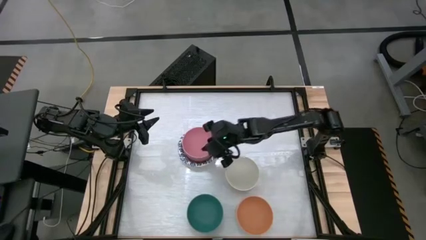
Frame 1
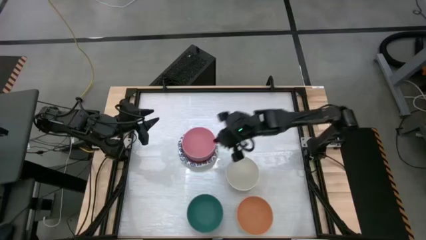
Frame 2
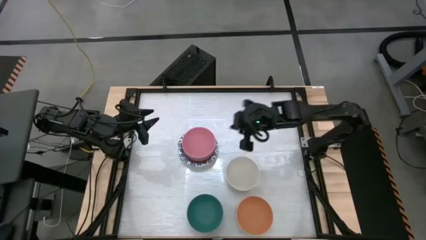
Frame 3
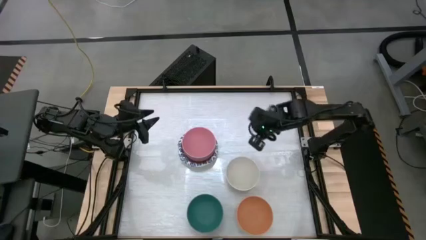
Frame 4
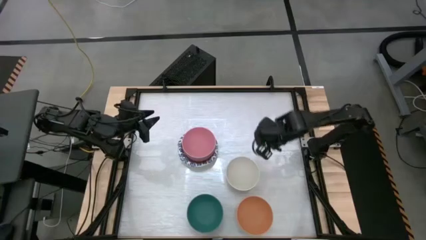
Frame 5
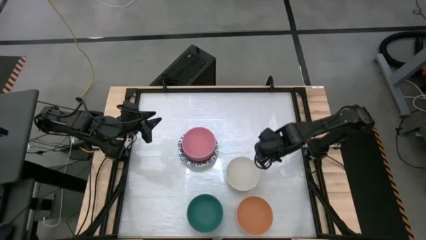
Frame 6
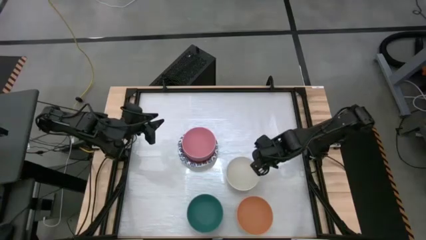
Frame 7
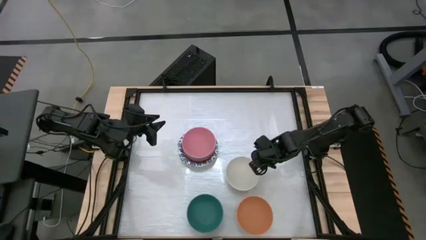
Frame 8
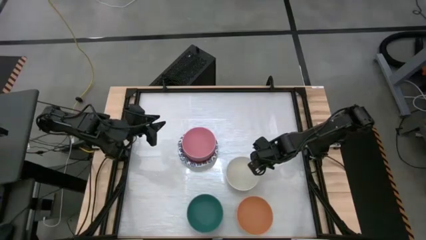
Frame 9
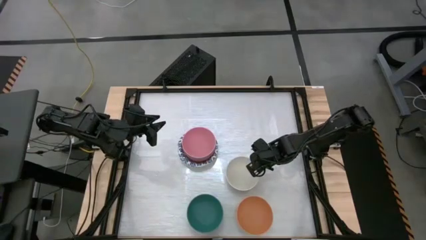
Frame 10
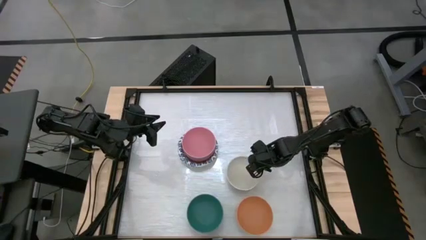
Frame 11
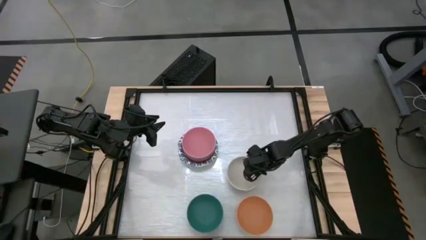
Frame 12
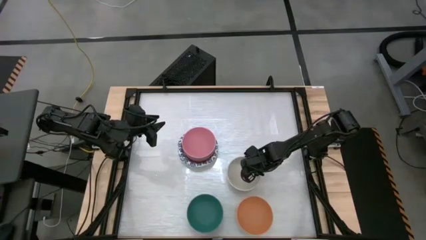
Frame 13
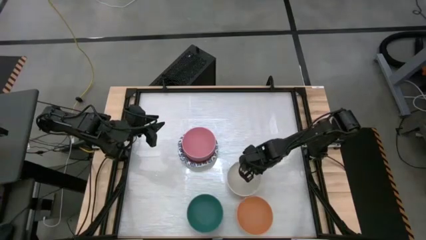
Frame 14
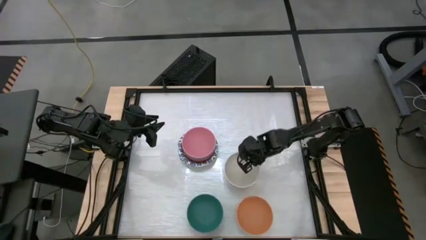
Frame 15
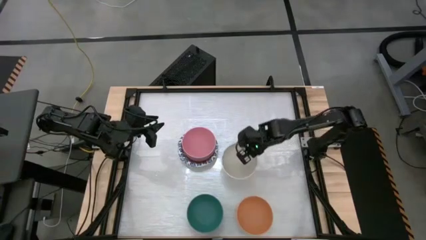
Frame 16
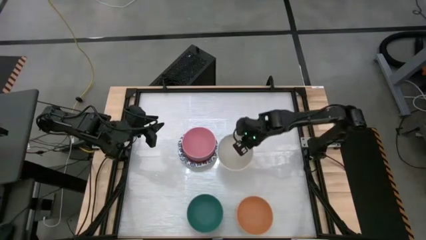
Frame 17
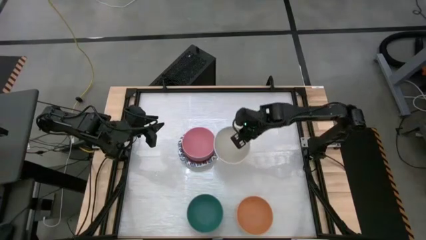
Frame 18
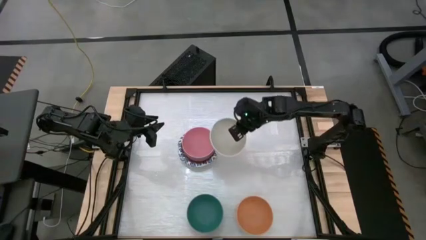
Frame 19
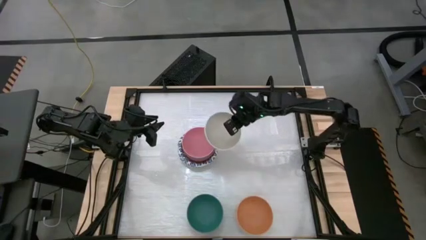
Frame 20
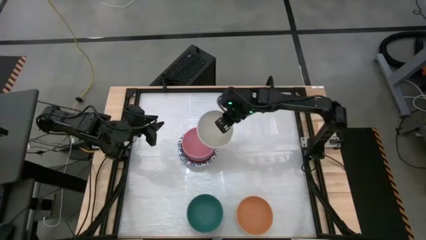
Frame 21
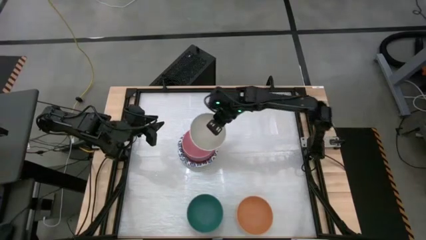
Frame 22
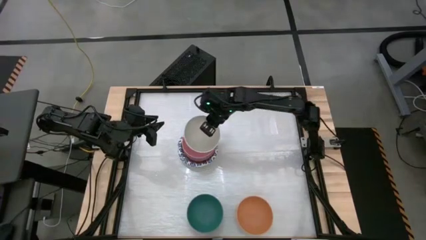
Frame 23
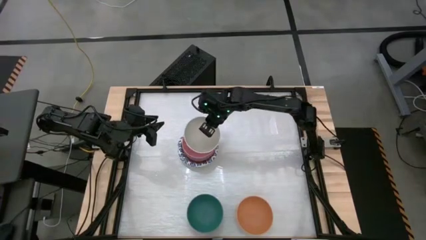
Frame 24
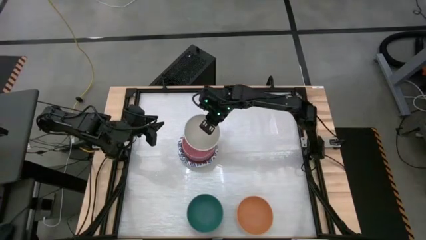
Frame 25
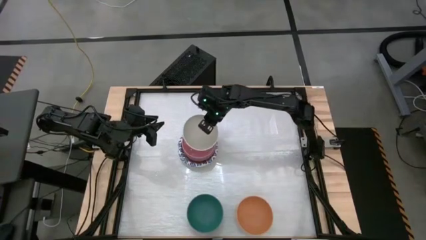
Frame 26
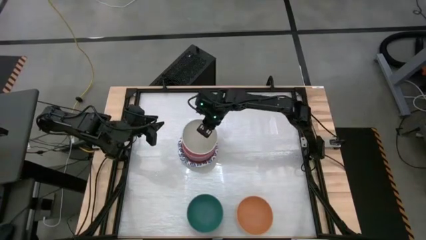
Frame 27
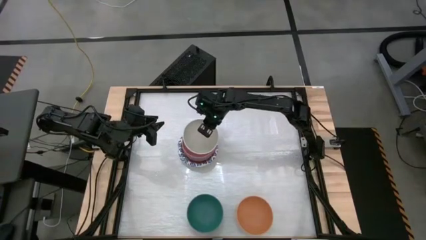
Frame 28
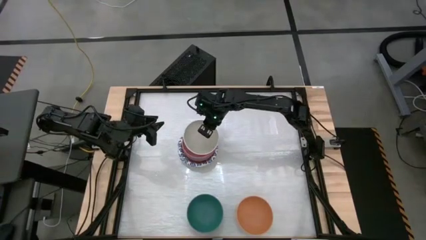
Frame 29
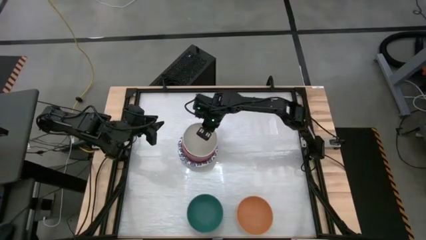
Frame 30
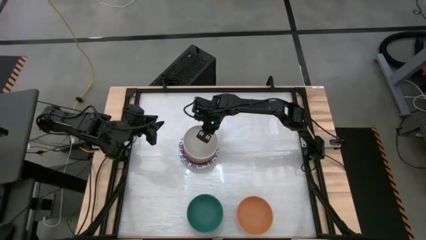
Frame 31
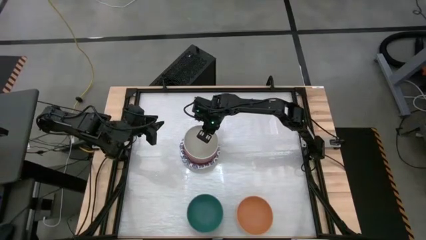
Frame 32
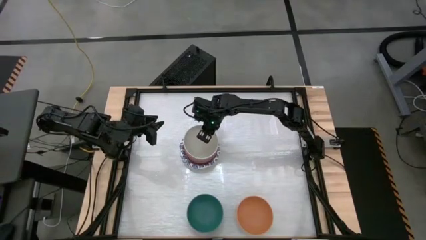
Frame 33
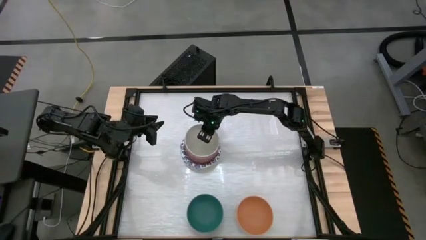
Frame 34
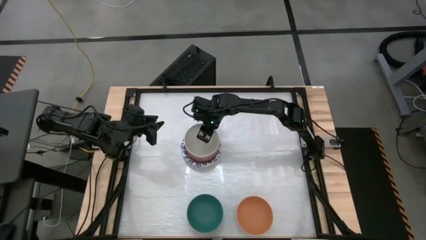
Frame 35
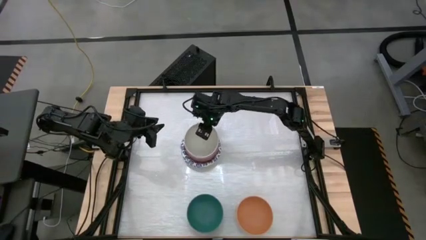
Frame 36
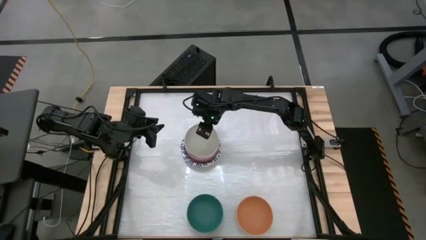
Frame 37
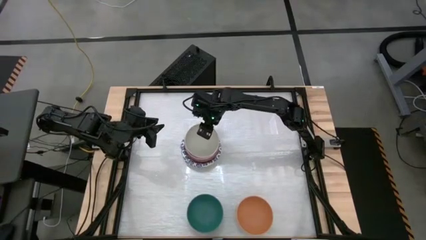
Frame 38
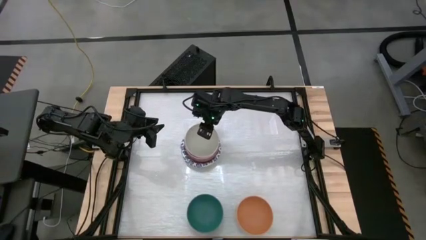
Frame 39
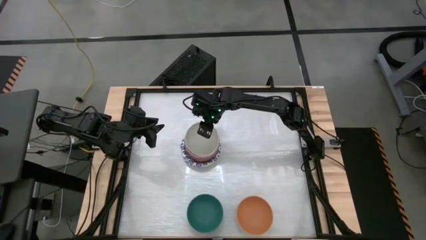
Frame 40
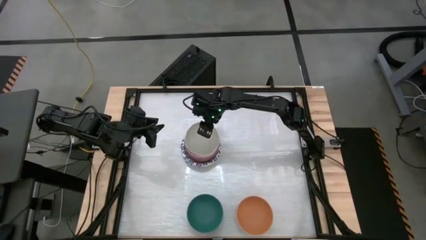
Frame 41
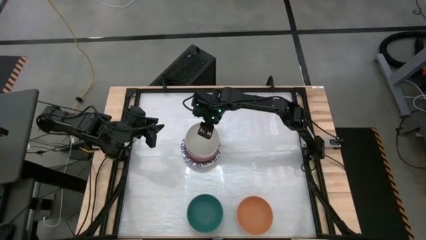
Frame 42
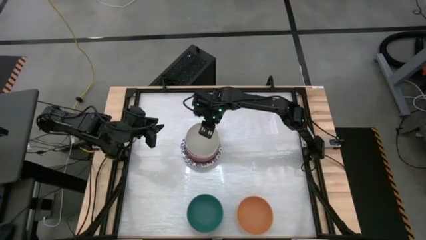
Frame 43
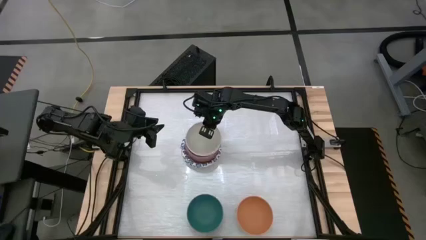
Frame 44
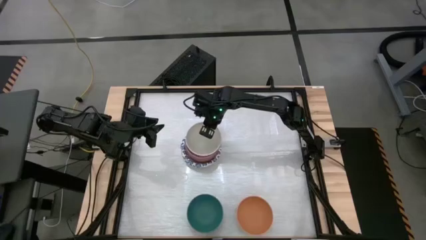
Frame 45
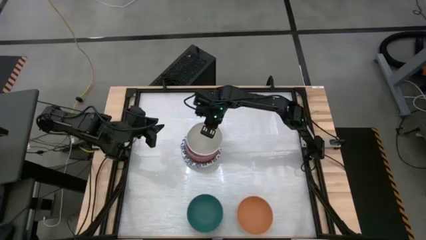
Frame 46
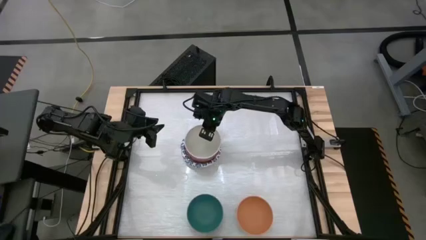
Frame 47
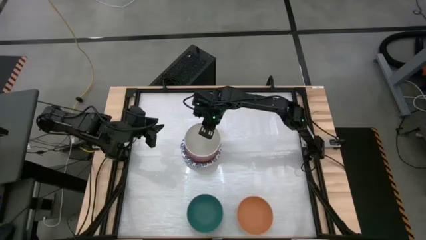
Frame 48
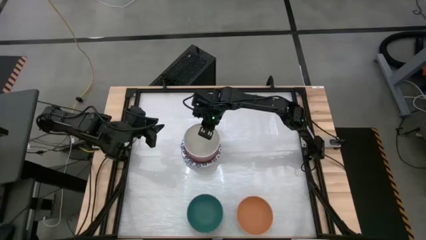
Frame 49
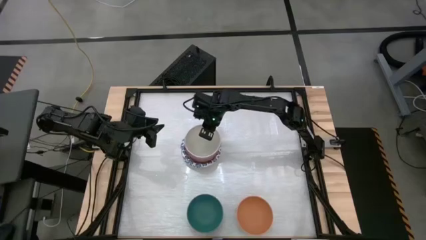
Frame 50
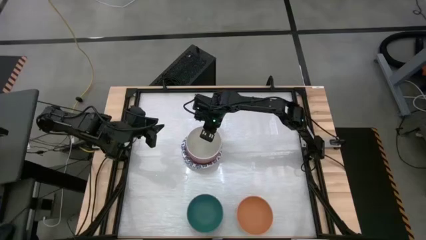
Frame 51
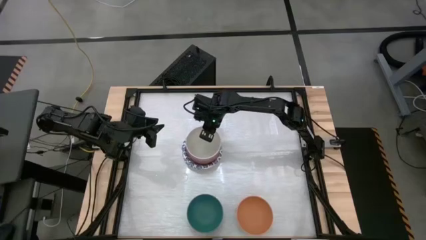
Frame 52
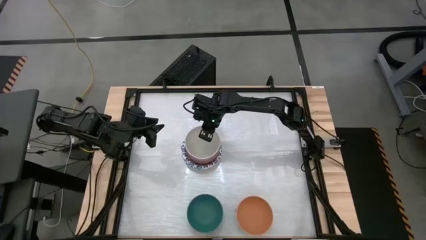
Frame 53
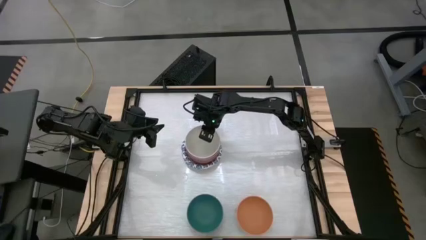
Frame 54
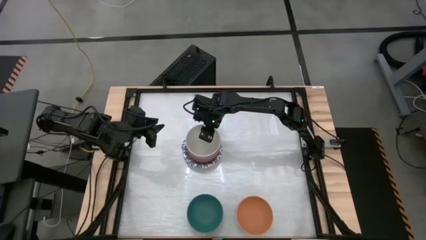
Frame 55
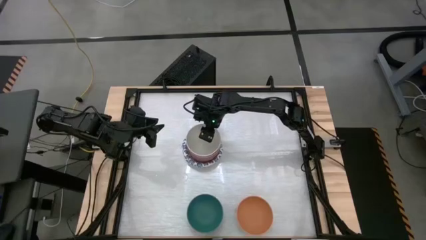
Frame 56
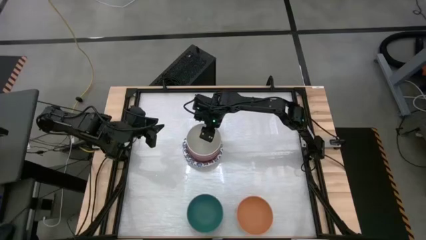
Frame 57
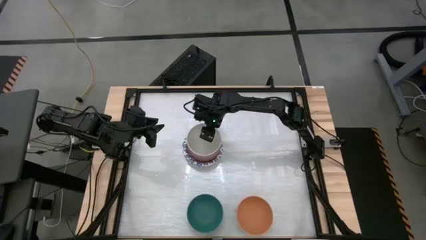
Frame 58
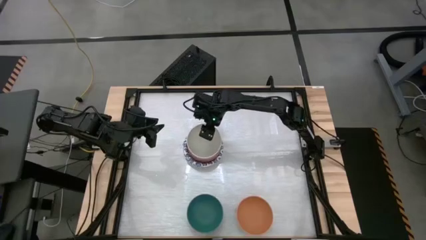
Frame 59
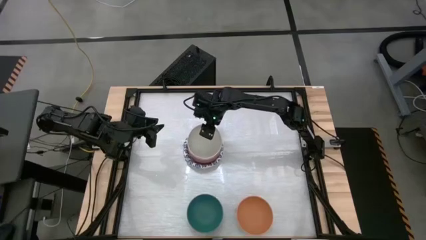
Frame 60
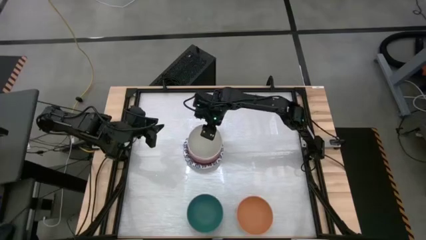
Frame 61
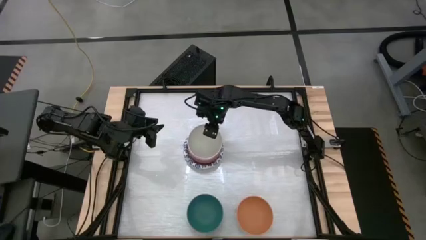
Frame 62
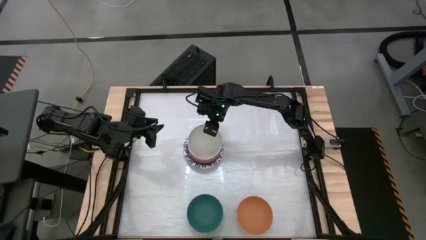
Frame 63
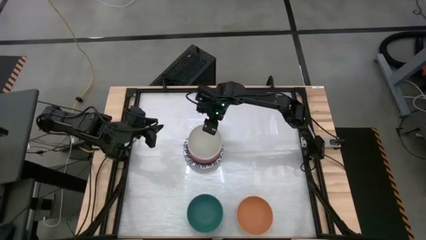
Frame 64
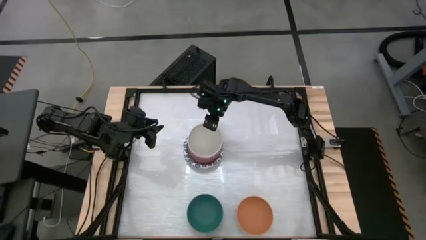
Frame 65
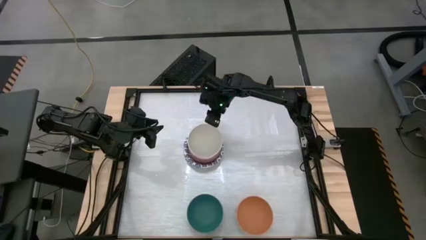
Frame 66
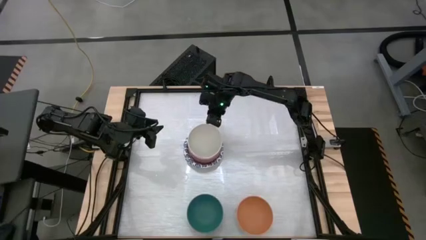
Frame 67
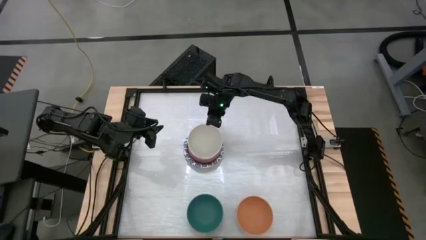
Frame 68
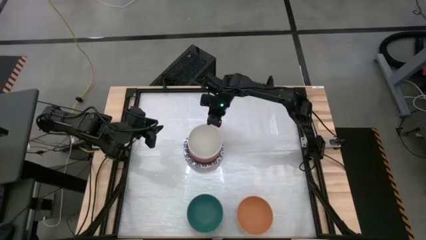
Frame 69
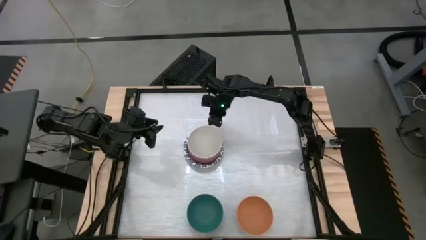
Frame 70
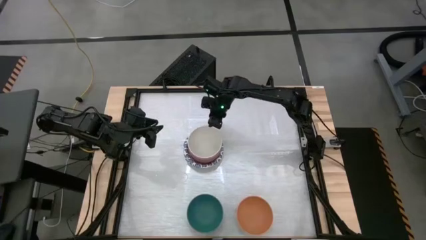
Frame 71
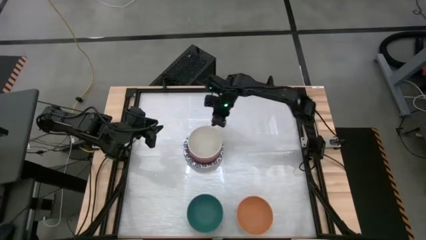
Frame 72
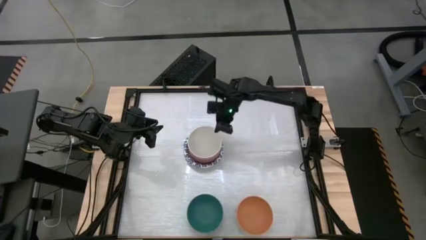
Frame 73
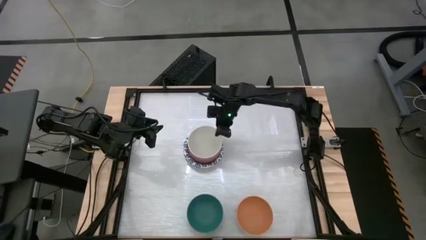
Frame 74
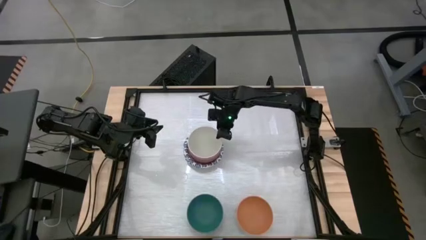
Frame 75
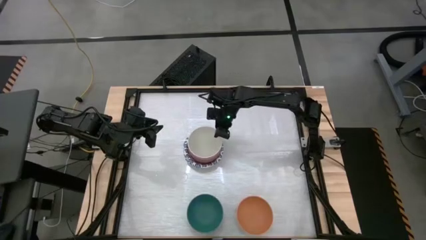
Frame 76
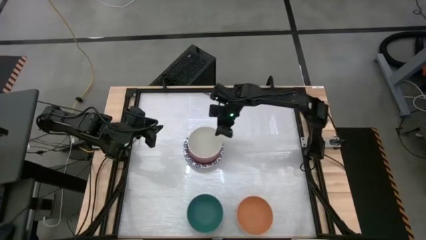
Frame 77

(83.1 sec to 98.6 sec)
Stack the white bowl on top of the pink bowl
